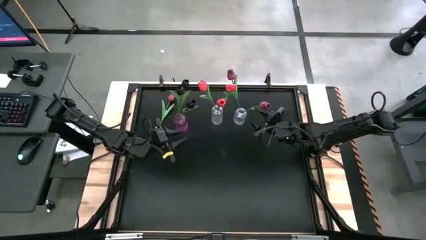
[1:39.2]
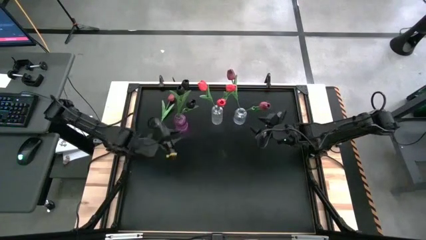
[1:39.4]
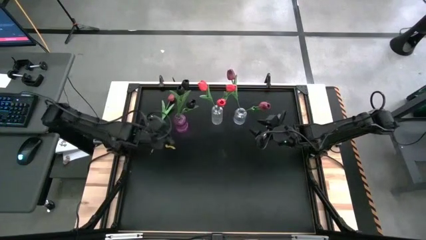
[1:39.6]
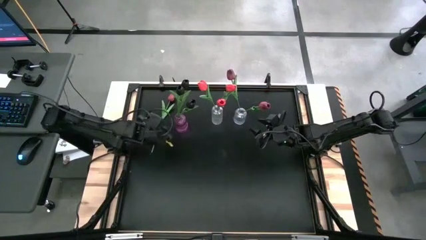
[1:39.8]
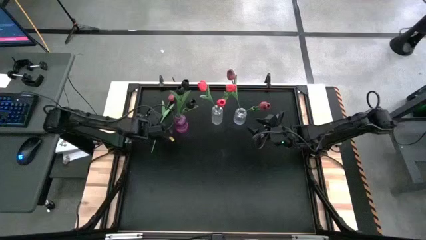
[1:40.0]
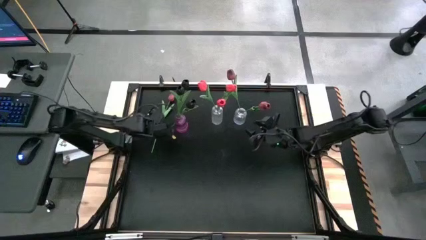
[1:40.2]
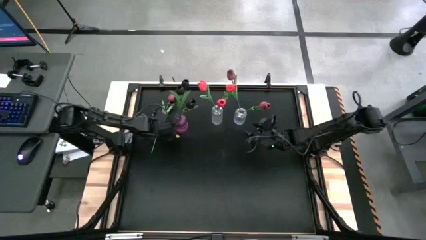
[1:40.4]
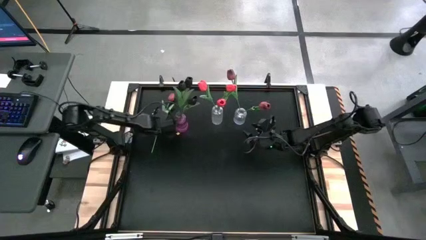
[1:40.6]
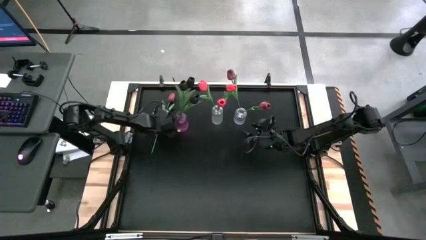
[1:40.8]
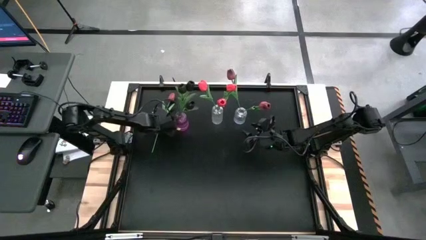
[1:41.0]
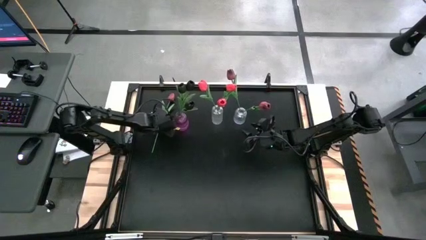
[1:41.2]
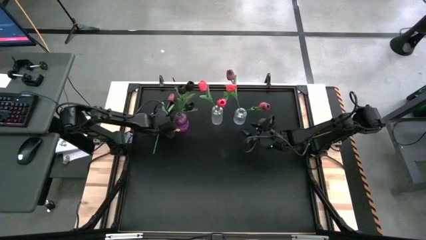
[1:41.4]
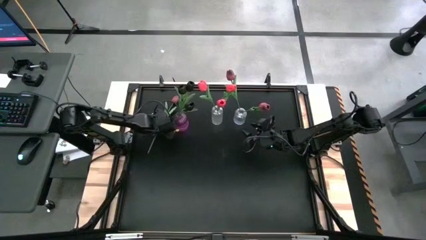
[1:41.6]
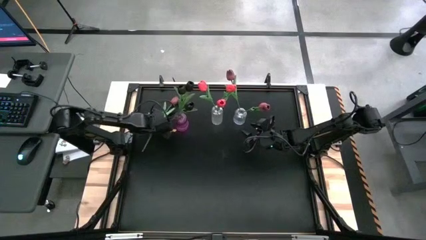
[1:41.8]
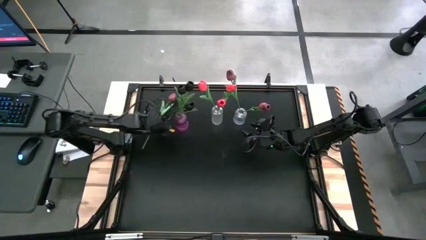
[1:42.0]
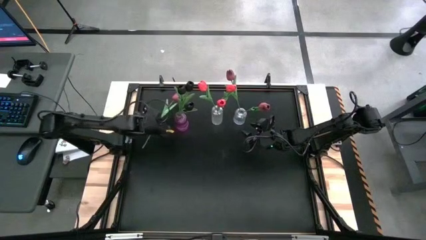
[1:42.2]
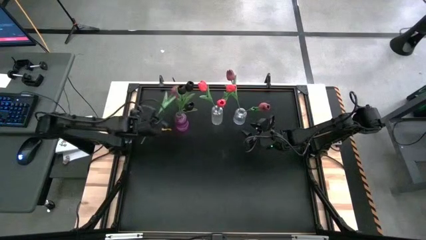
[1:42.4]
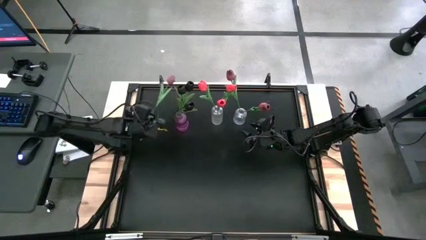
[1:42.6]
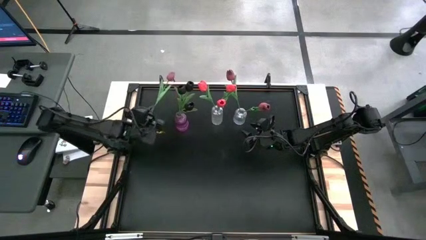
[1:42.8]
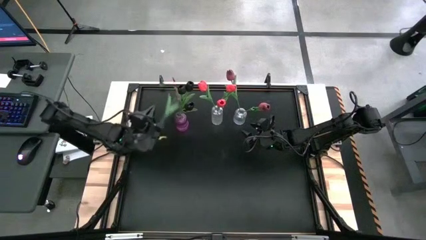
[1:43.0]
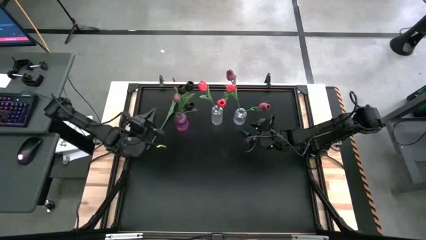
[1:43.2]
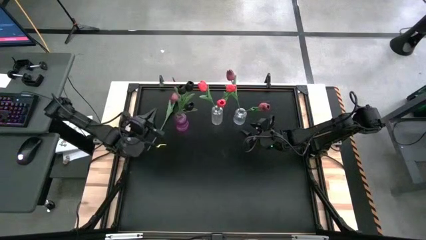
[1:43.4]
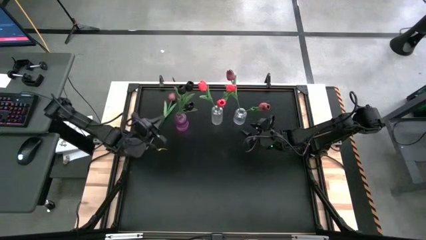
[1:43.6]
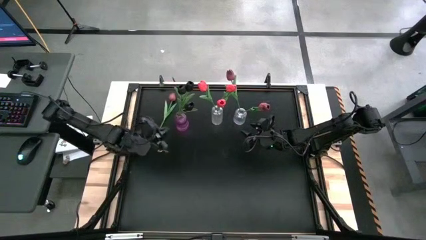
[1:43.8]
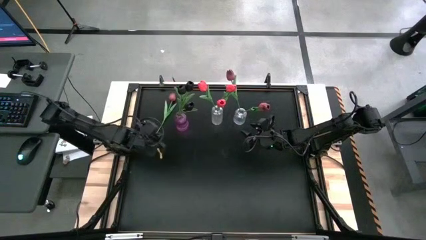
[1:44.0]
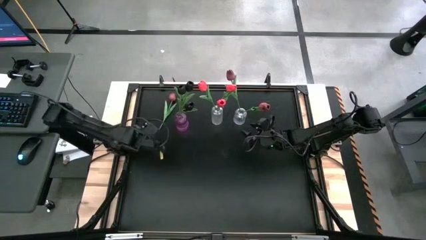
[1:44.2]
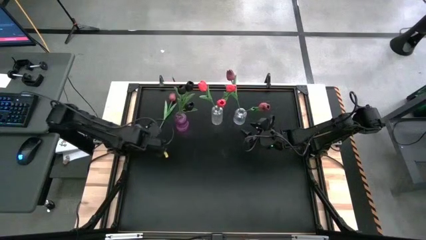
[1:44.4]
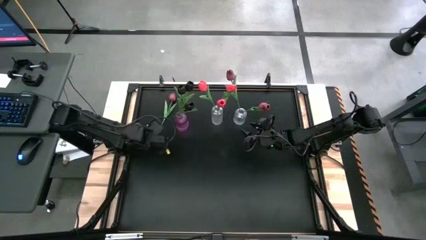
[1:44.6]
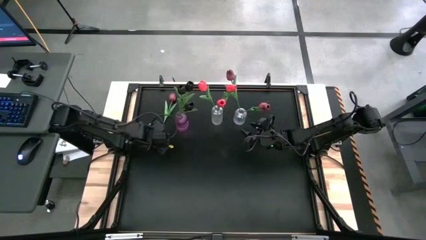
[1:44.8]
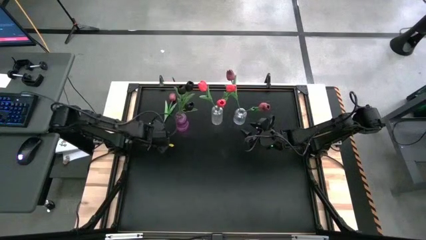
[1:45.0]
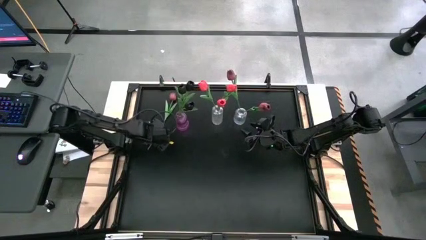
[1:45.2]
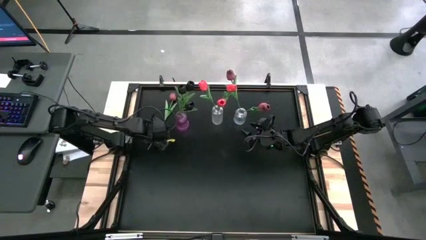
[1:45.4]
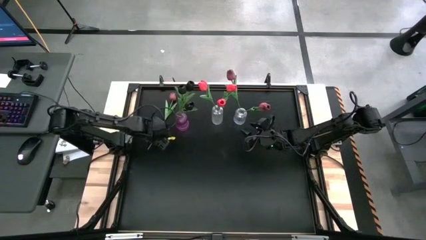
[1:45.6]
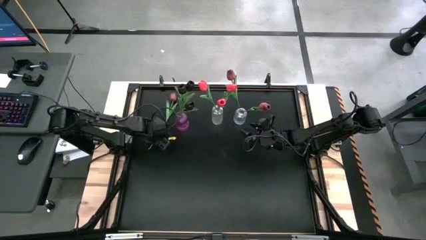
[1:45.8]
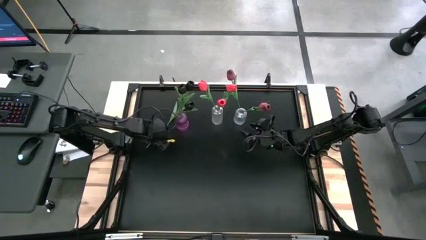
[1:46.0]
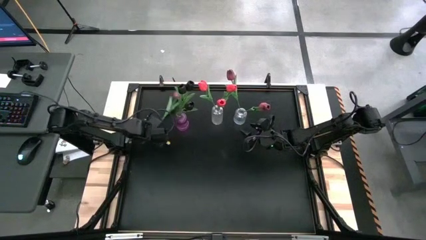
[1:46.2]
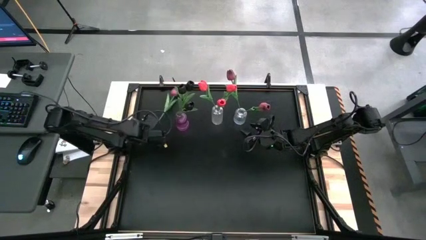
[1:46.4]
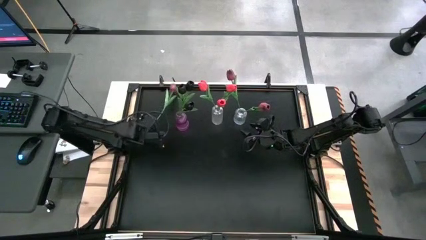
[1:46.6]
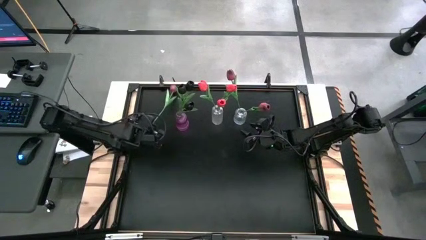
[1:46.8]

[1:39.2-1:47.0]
Task: Sort flowers into vase by color
Put the dark red flower into the right transparent vase

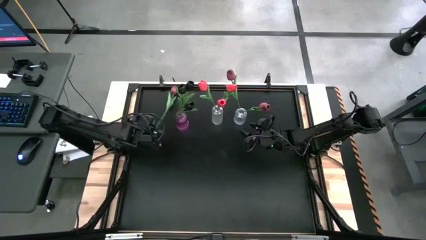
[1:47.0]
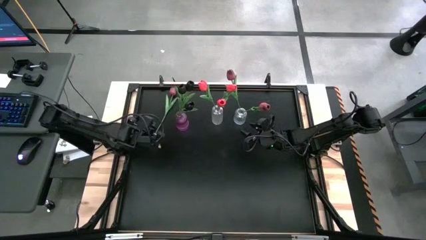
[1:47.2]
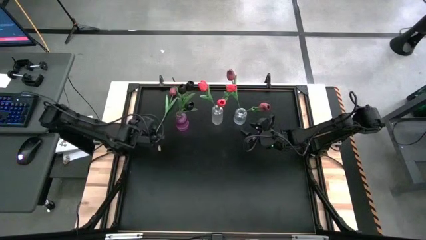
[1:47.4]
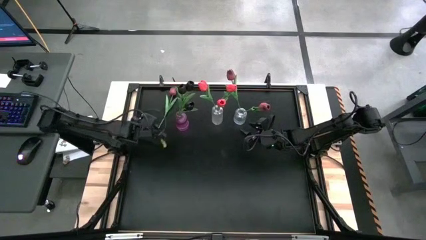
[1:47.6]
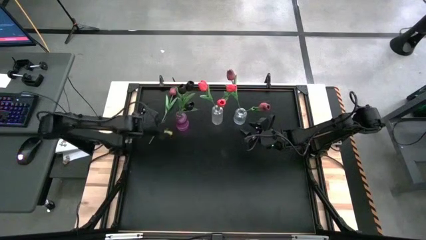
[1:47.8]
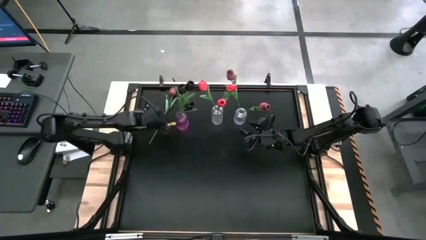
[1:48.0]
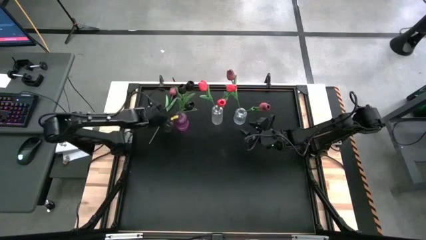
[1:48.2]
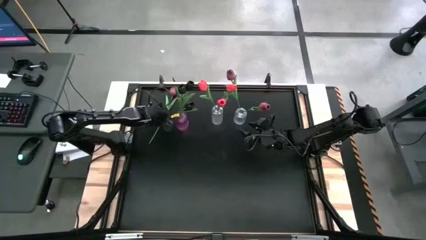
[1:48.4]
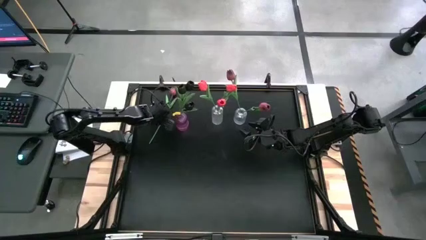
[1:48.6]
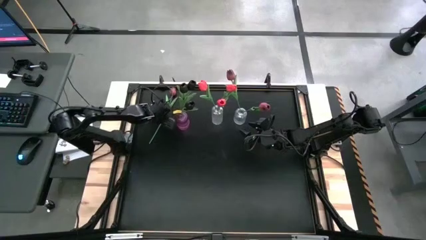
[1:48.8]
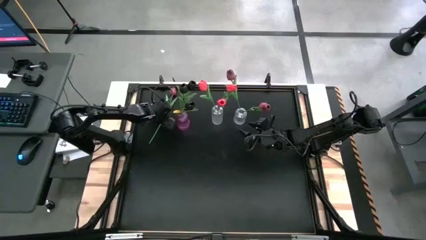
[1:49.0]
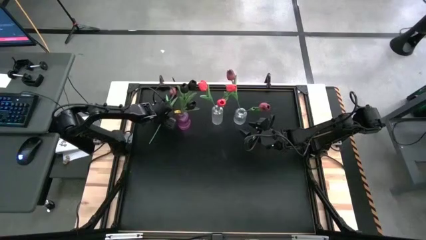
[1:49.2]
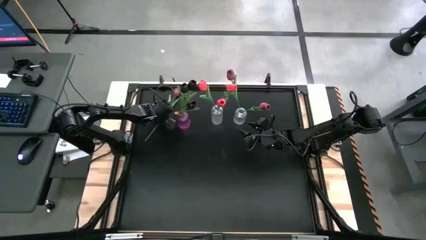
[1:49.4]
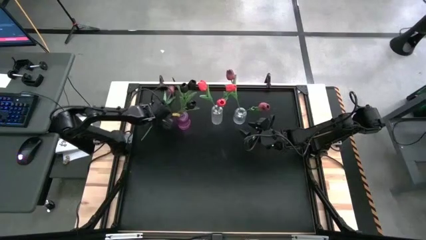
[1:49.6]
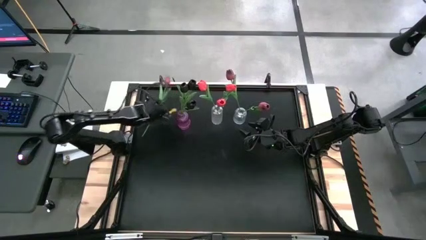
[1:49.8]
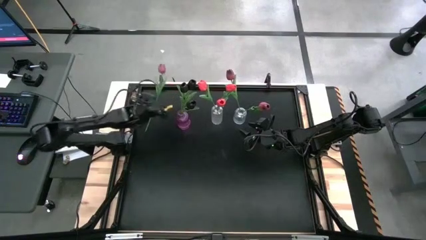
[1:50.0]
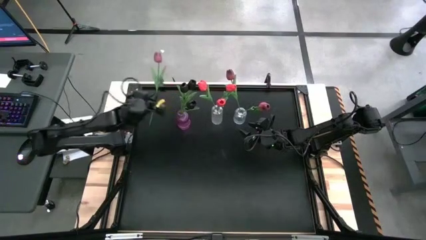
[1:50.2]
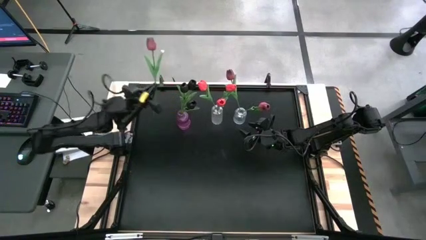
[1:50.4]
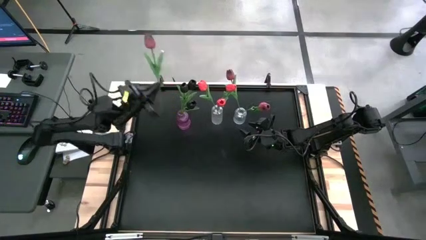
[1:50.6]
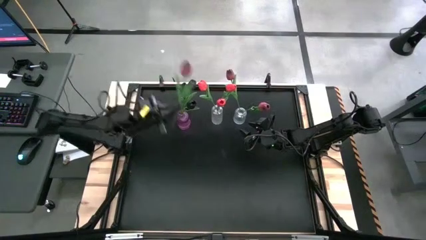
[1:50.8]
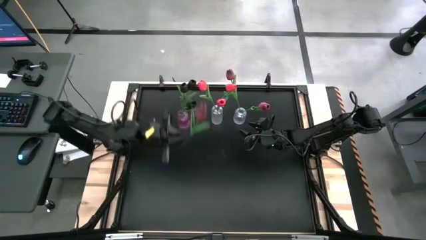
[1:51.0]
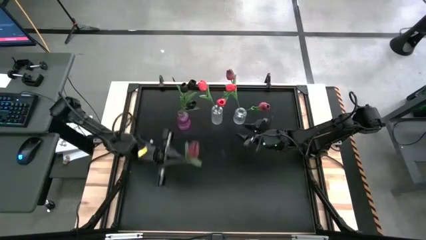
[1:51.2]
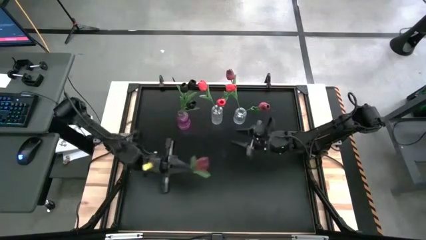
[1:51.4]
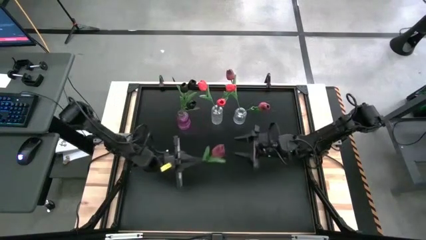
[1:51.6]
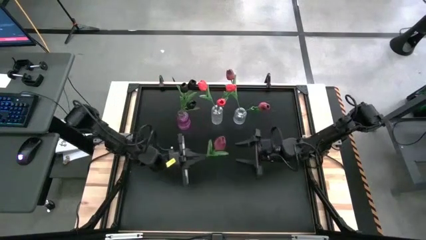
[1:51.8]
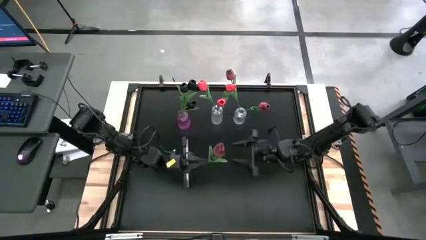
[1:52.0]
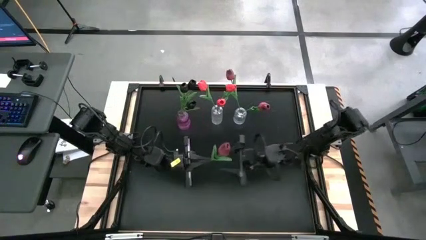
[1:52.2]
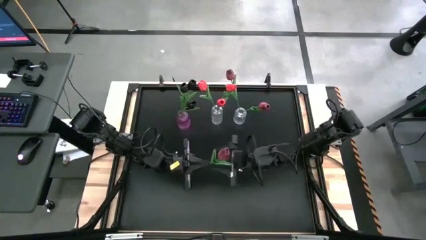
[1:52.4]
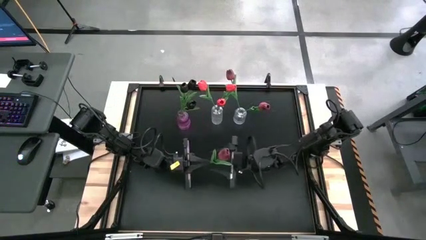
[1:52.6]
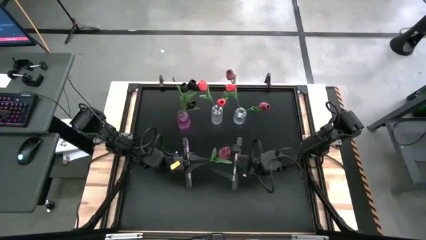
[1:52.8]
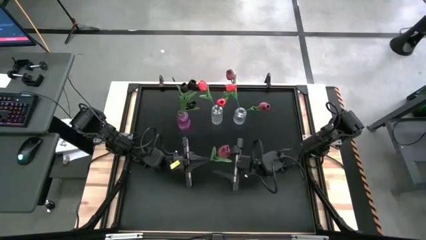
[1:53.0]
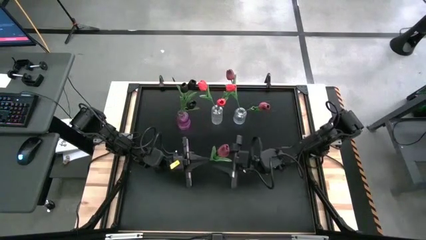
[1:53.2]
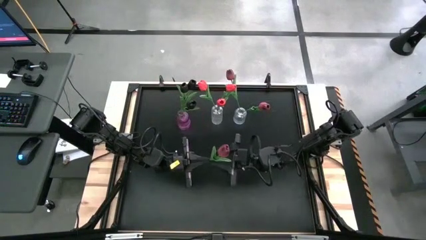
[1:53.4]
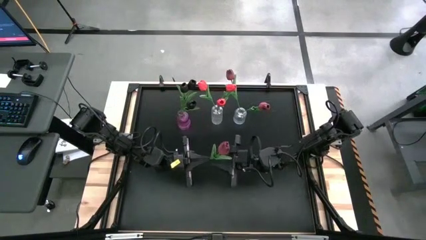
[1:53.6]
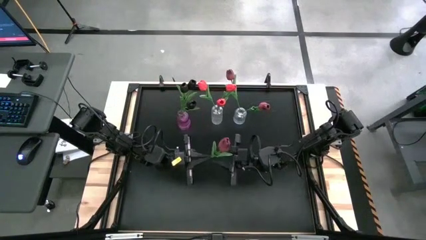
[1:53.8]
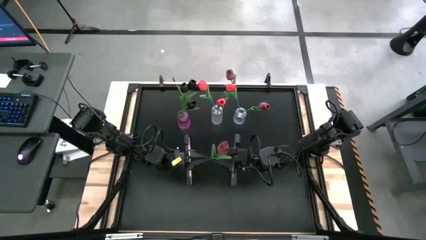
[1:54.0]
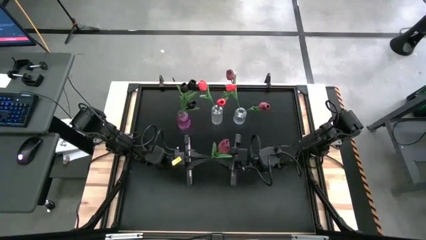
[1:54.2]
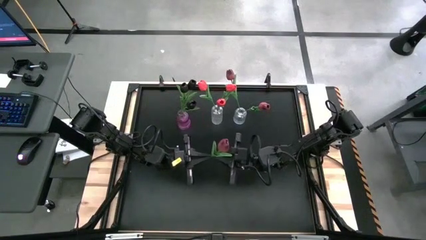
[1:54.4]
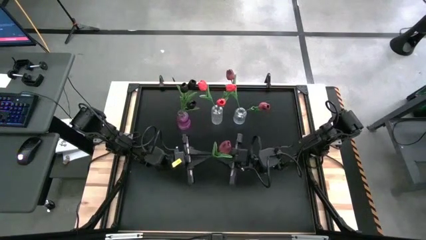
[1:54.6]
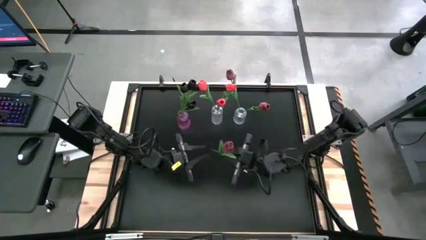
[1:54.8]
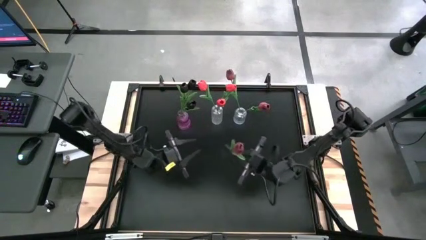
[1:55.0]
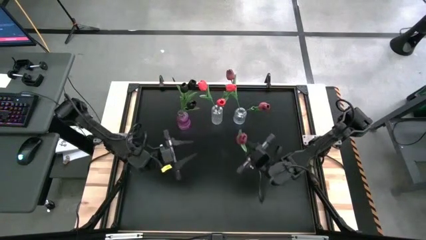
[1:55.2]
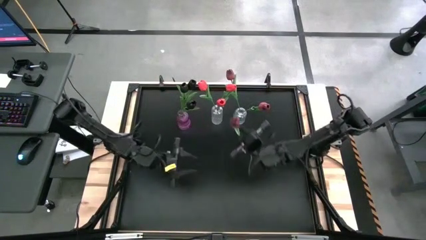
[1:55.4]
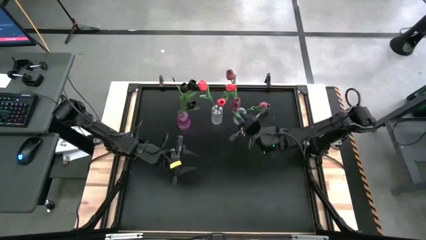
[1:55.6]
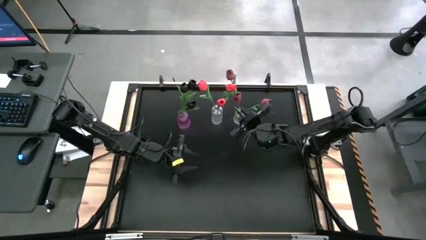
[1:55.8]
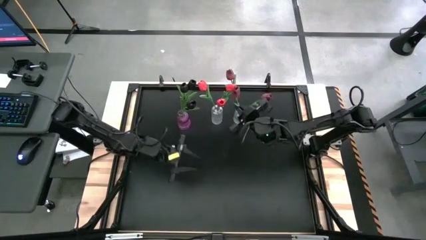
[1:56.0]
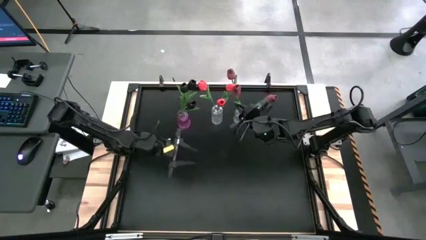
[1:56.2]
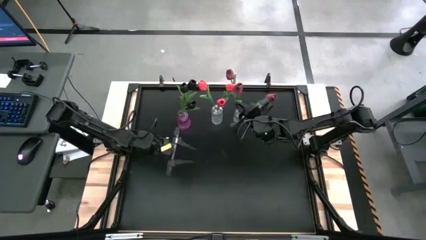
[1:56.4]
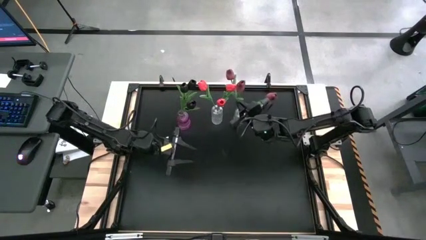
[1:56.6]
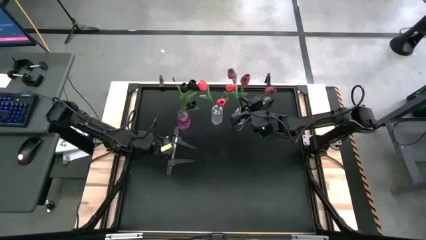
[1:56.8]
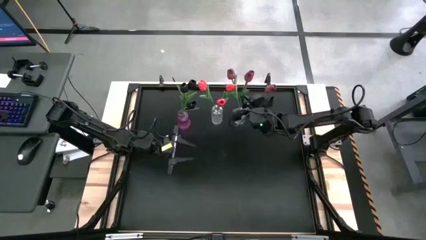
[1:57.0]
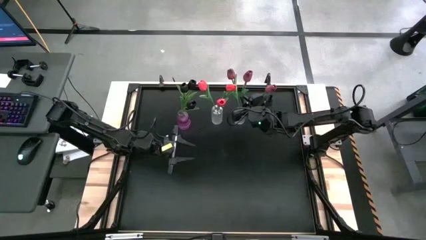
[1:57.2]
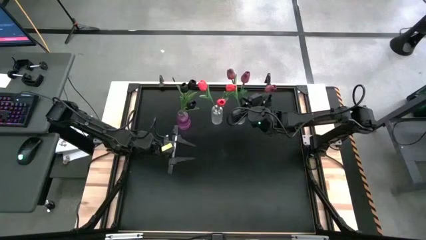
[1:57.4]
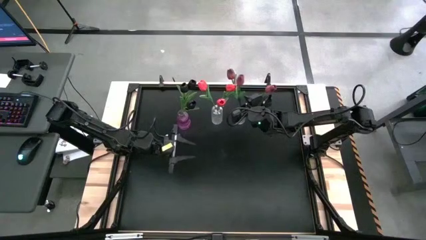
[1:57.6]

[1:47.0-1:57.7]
Put the dark red flower into the right transparent vase
